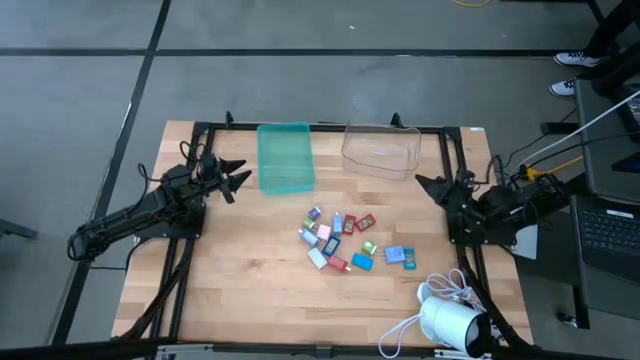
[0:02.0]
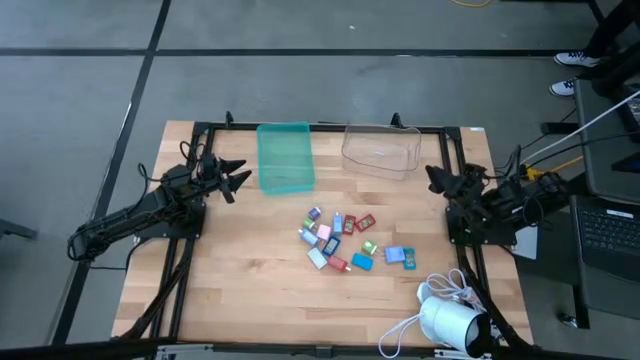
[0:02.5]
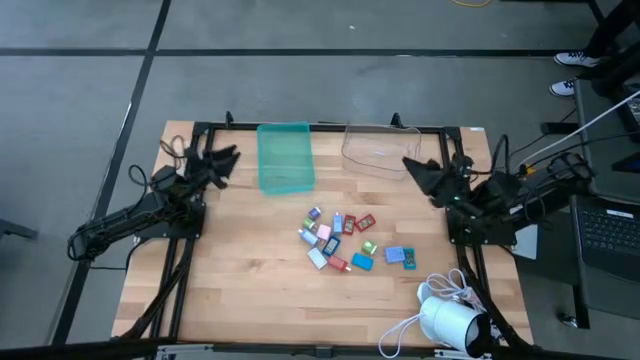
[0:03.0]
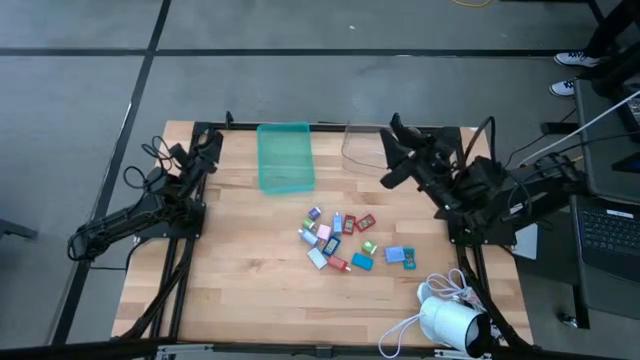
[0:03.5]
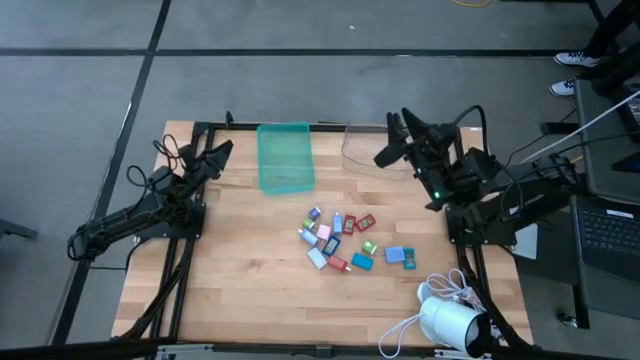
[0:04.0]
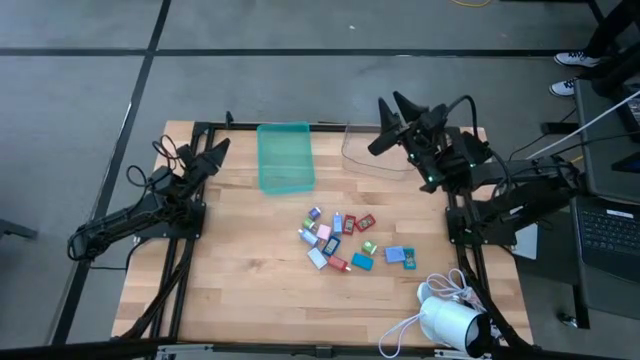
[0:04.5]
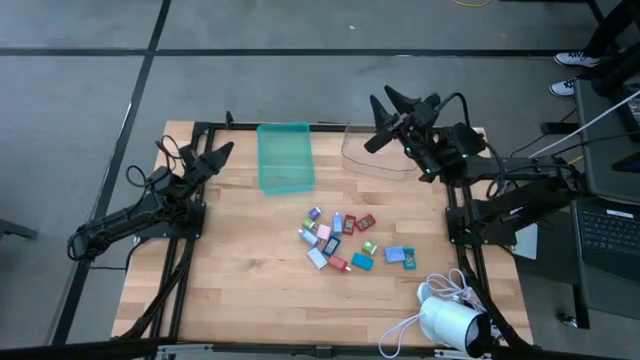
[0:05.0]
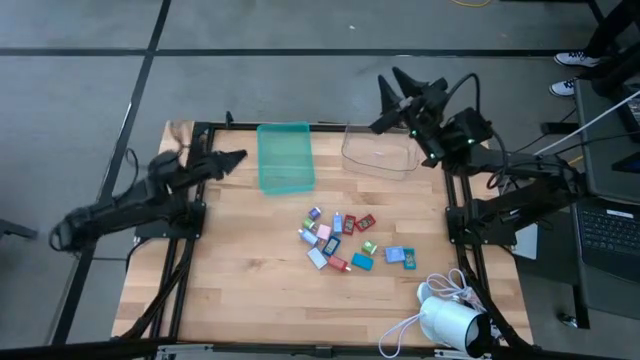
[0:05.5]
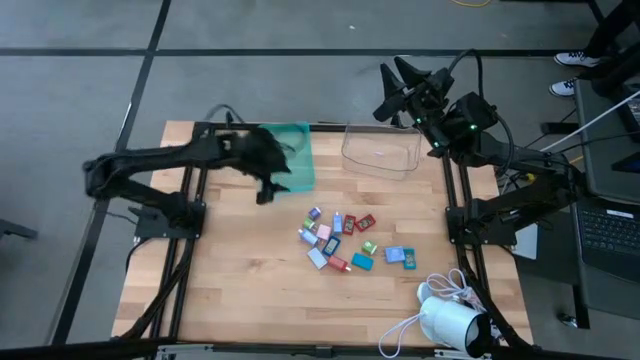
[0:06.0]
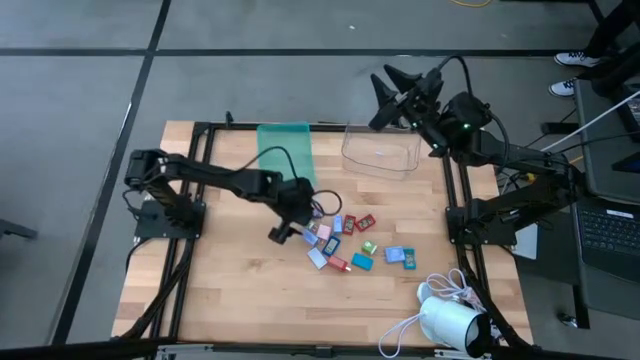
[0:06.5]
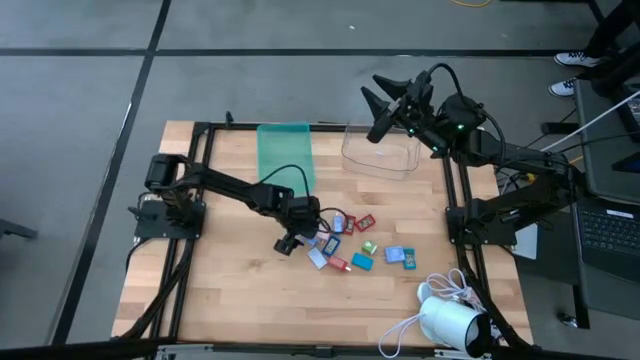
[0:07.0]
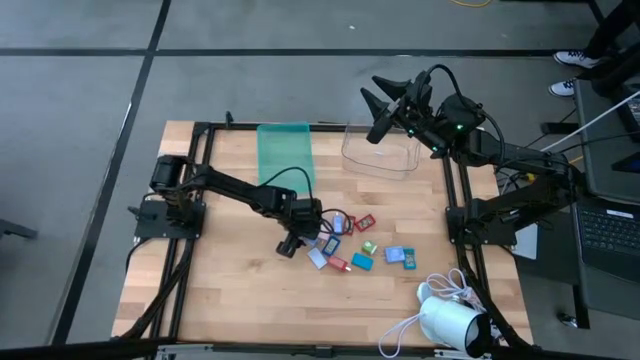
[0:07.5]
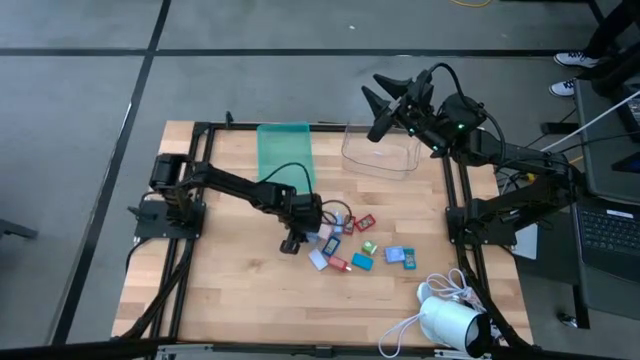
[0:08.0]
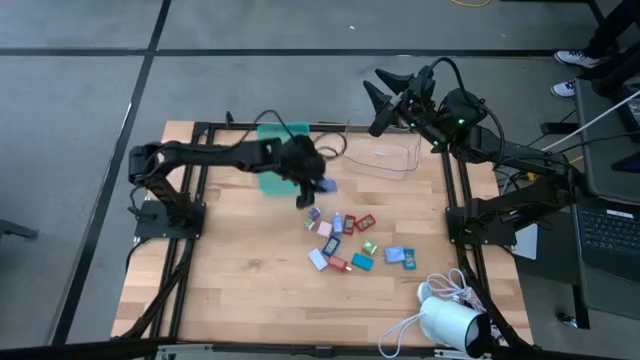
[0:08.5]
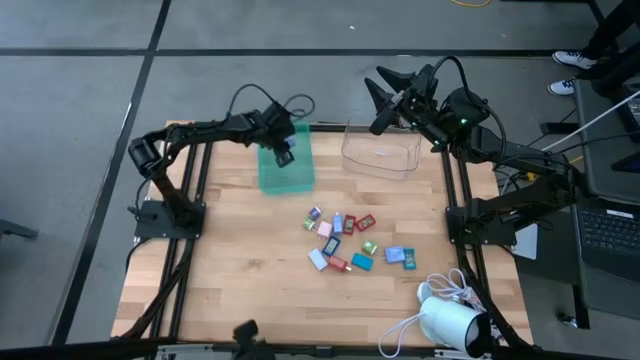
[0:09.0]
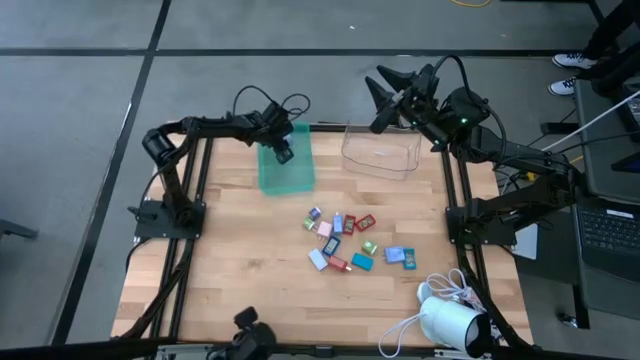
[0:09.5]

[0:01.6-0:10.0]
Task: Pick & Place Office items
Put the left light blue charger adapter into the green bin

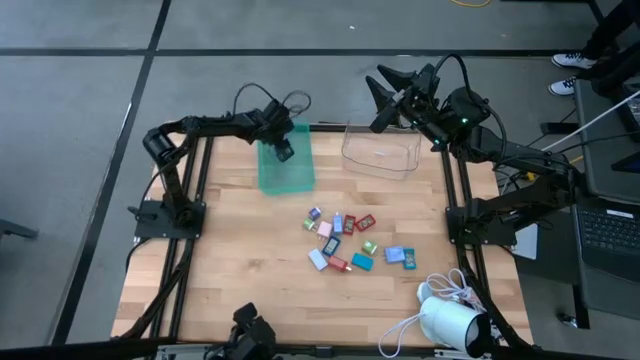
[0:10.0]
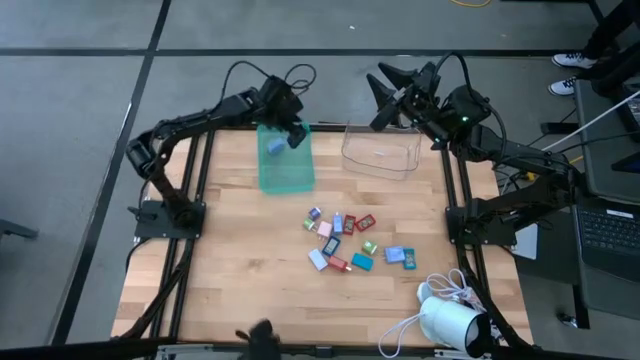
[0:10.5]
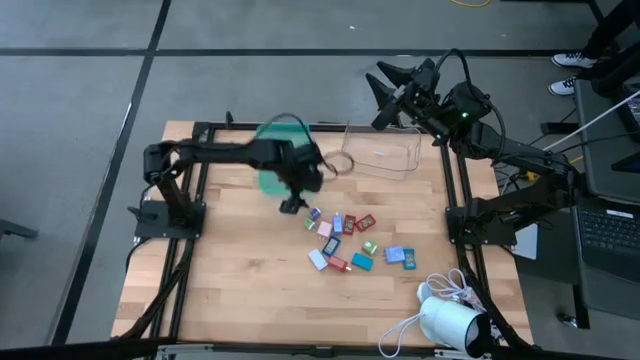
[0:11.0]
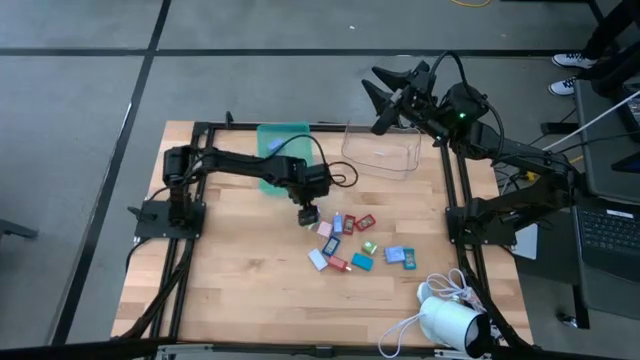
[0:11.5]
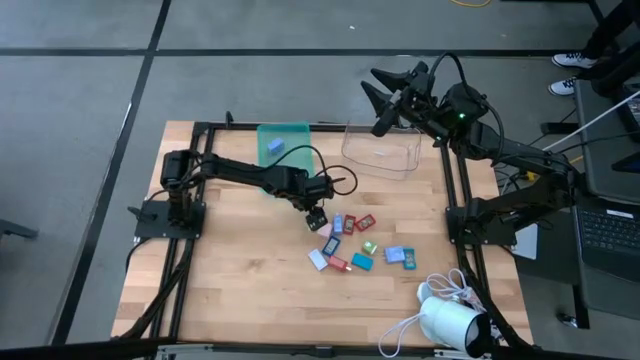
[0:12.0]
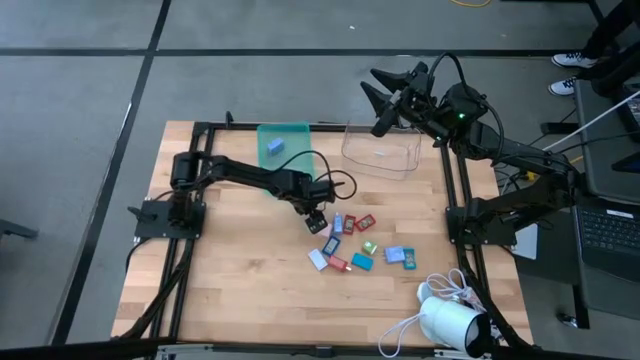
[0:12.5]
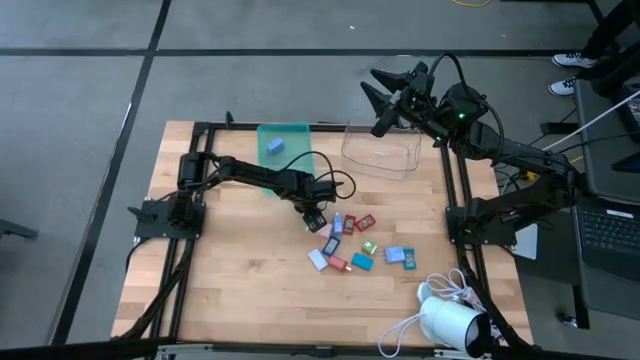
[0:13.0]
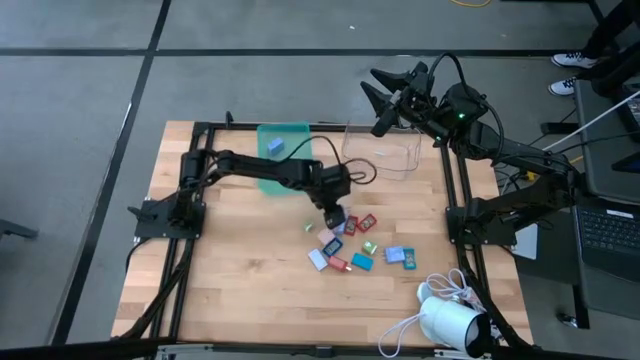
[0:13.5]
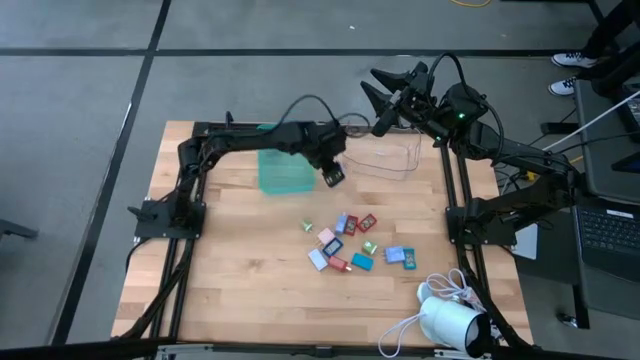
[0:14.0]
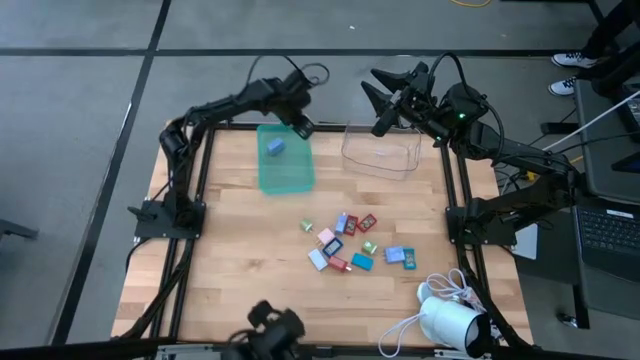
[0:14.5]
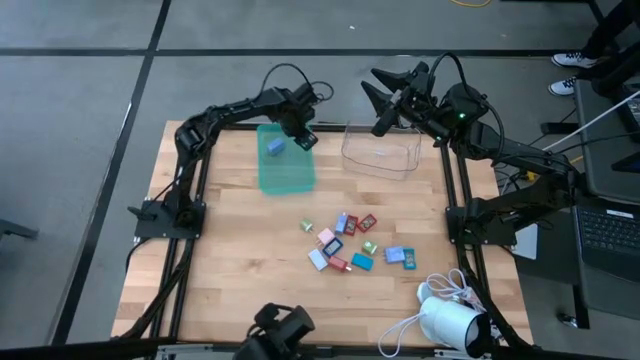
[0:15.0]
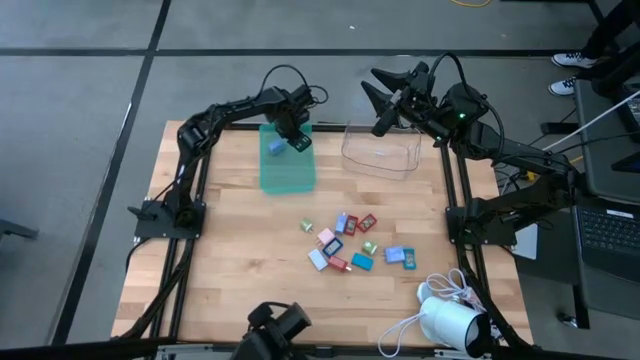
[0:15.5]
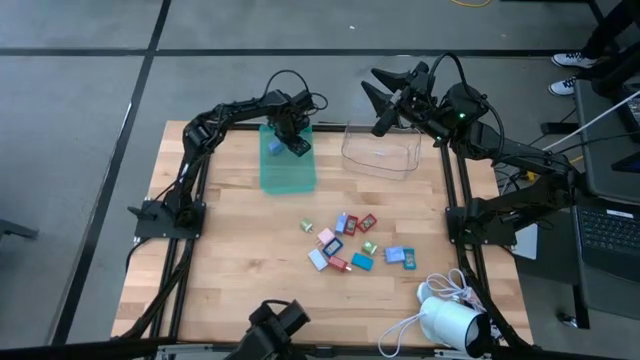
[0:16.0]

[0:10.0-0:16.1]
Put the violet charger adapter into the green bin

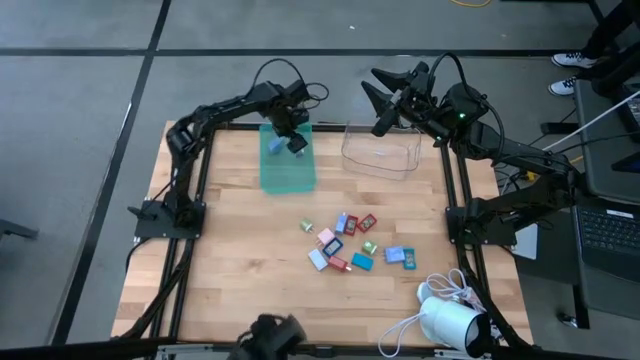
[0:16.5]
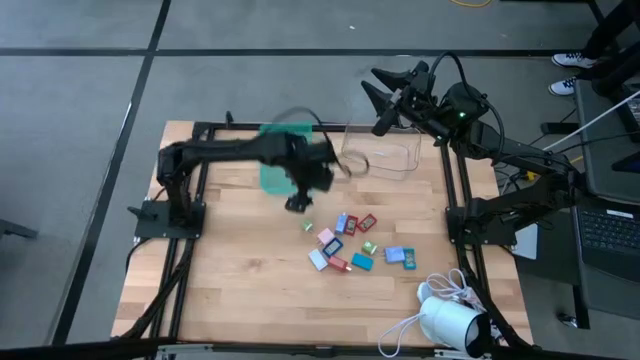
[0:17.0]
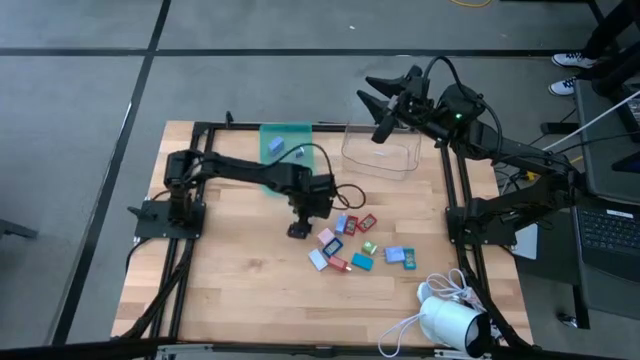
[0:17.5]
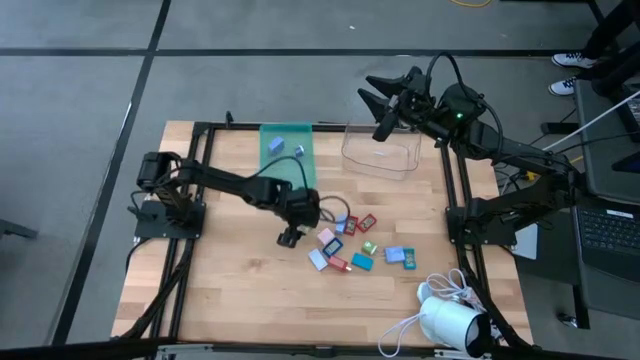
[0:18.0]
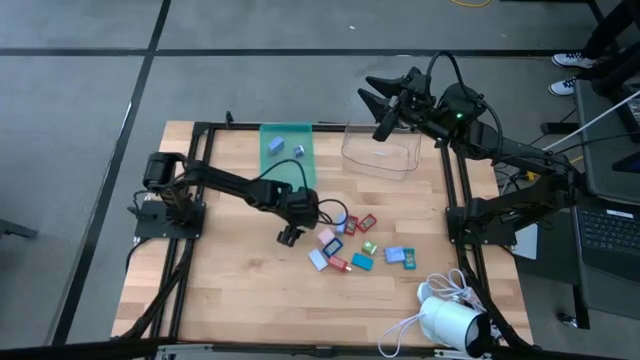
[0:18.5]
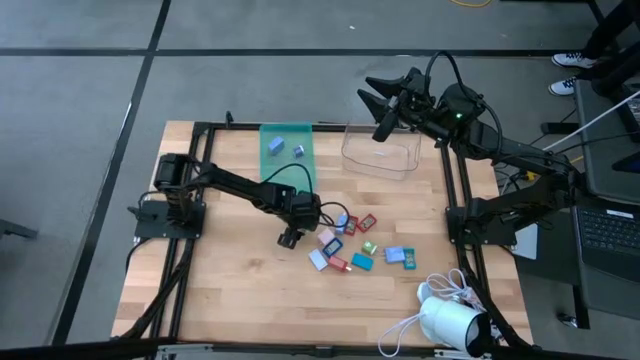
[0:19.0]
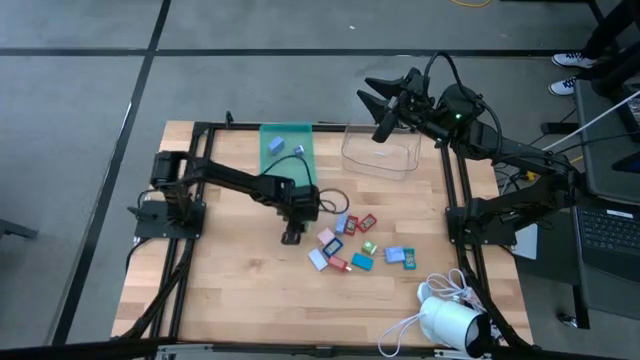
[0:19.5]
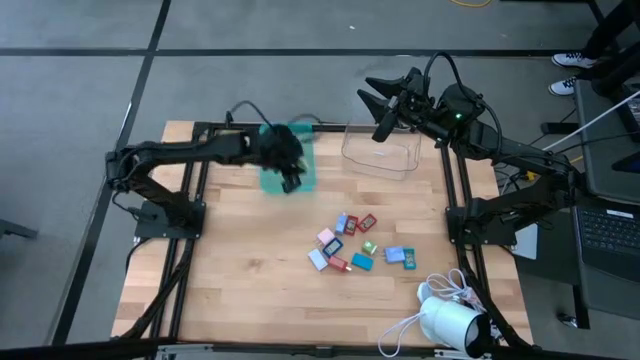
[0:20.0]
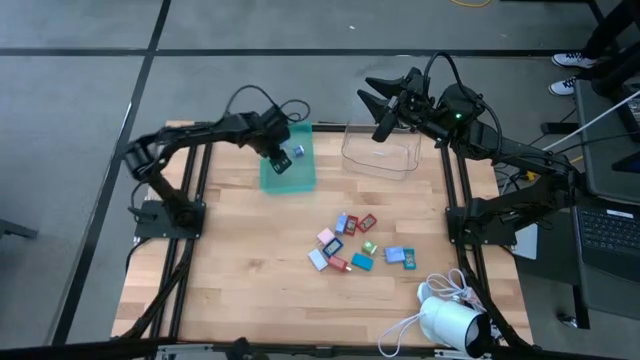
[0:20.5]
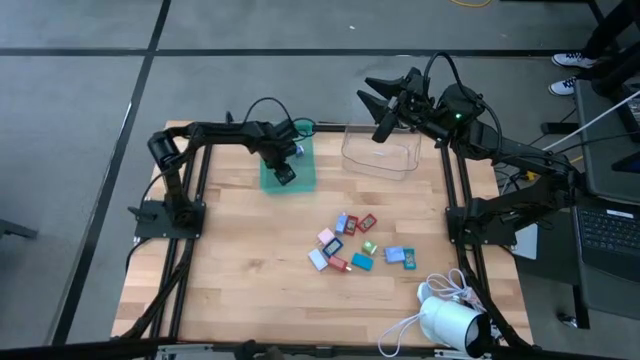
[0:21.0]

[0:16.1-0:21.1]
Put the left green charger adapter into the green bin

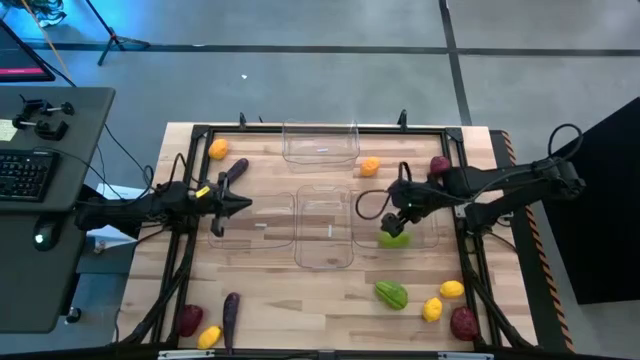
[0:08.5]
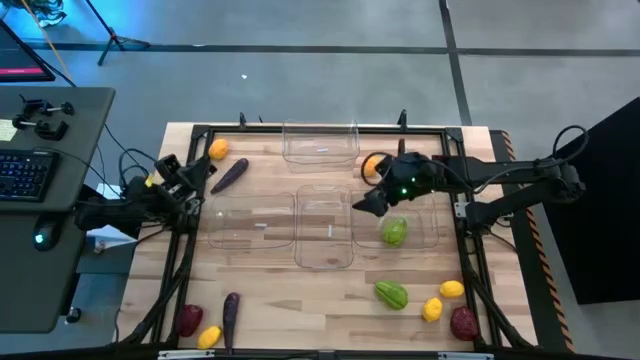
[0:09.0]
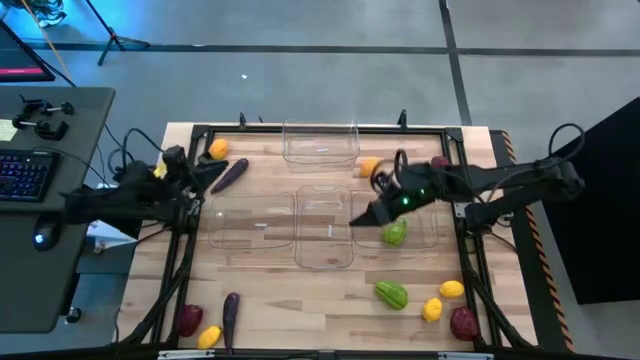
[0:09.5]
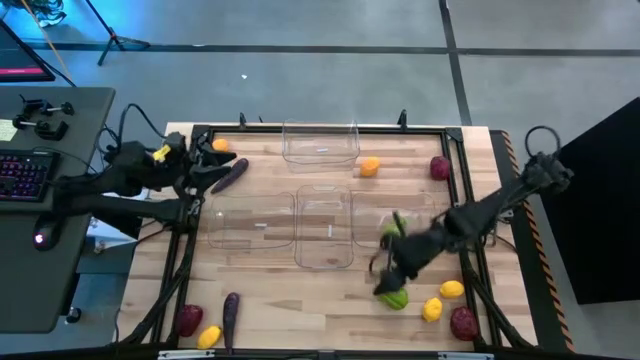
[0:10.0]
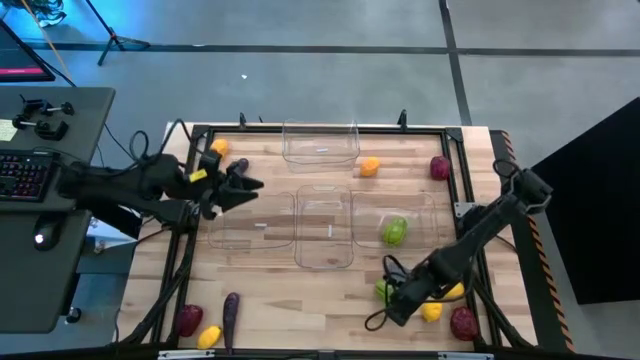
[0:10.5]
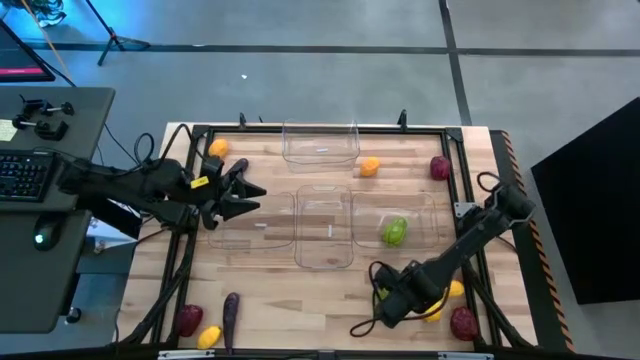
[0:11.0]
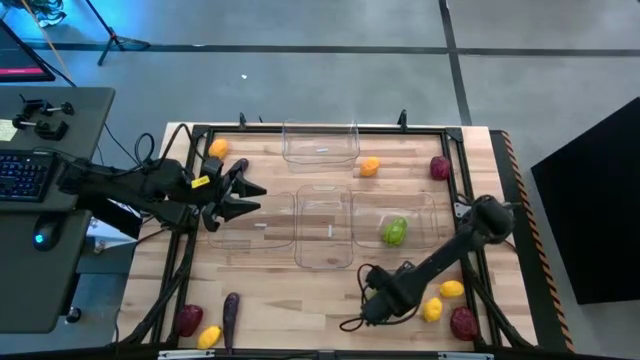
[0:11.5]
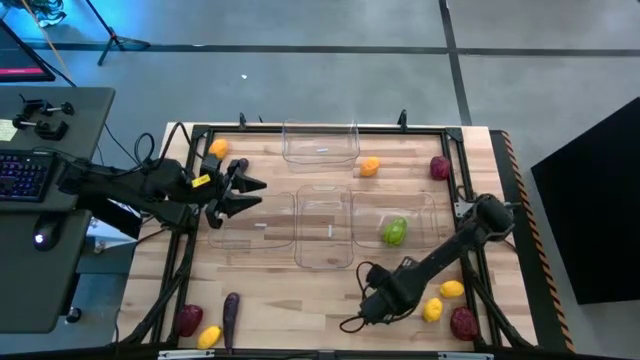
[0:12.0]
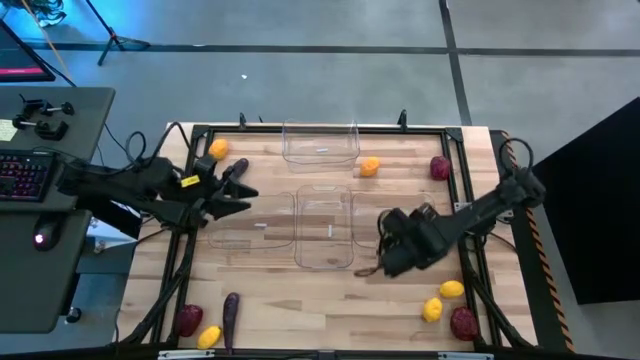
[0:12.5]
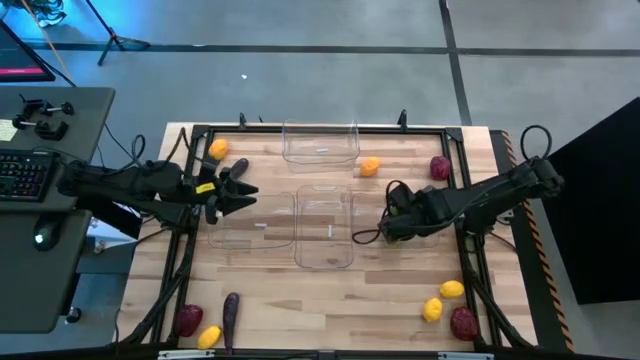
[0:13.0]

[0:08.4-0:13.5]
Task: Sort produce into baskets
Put the chayote into the bottom right transparent bin
